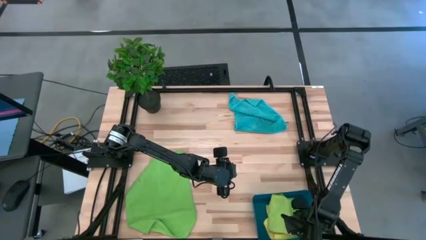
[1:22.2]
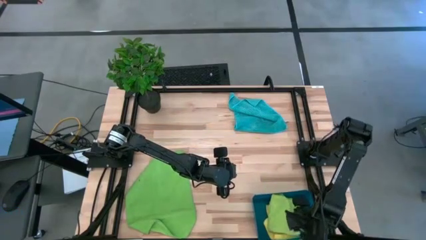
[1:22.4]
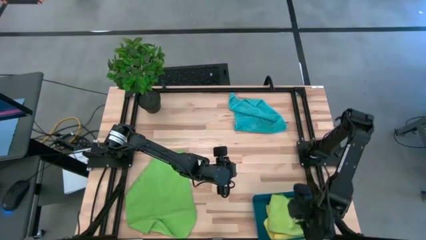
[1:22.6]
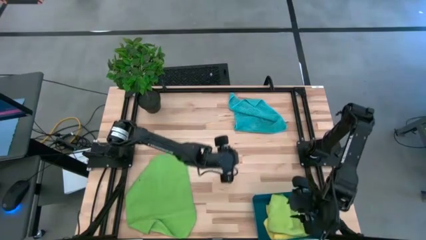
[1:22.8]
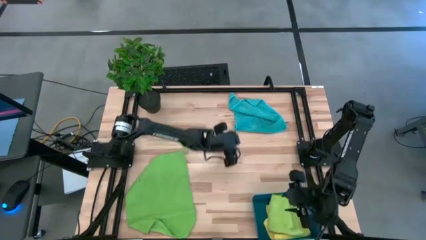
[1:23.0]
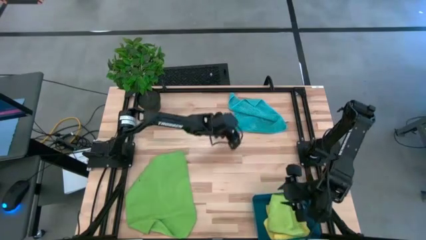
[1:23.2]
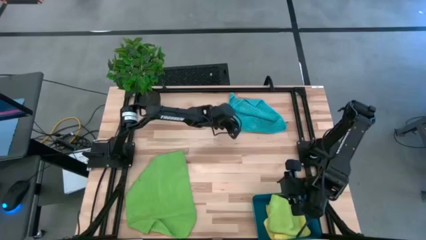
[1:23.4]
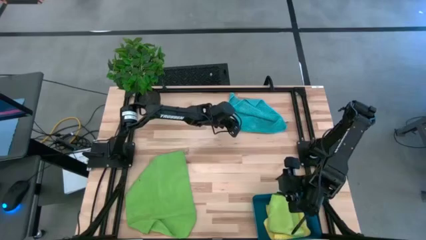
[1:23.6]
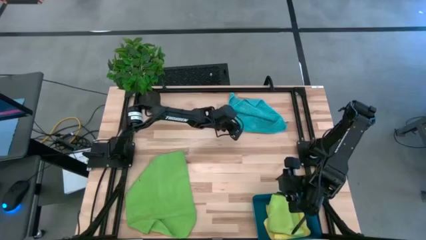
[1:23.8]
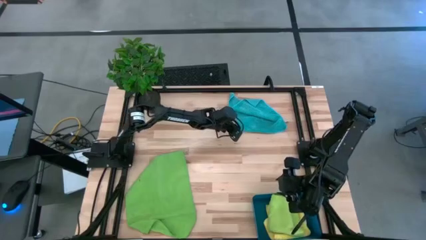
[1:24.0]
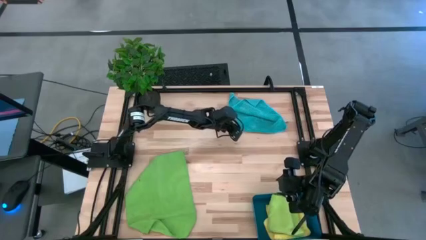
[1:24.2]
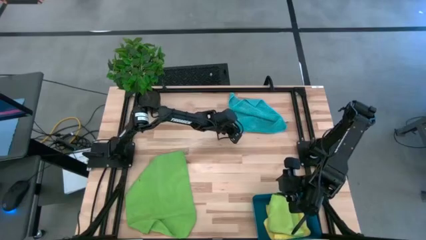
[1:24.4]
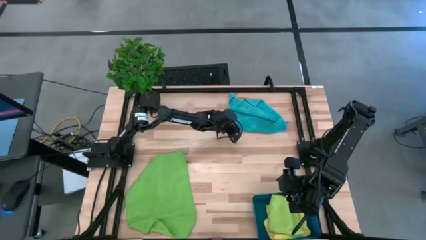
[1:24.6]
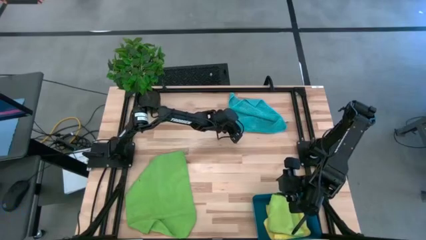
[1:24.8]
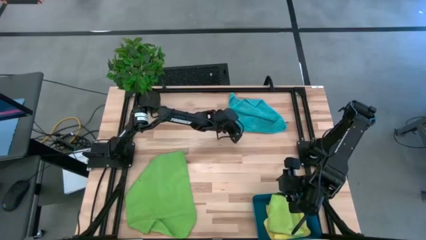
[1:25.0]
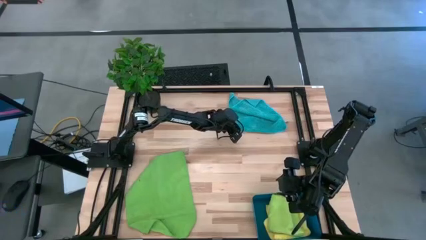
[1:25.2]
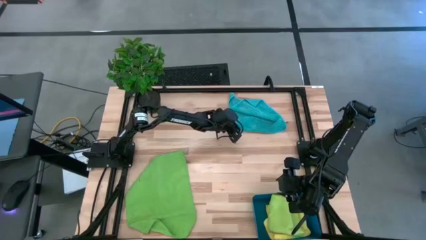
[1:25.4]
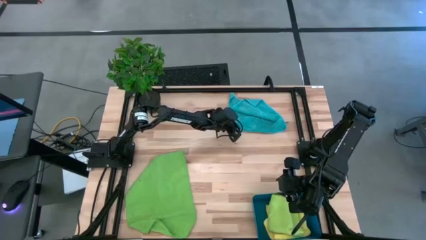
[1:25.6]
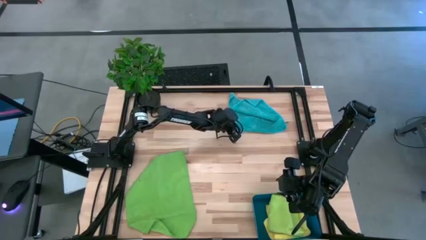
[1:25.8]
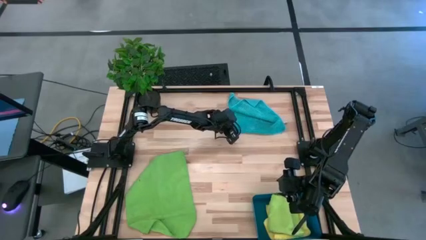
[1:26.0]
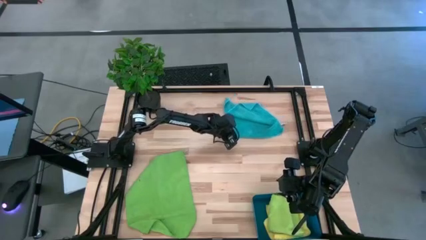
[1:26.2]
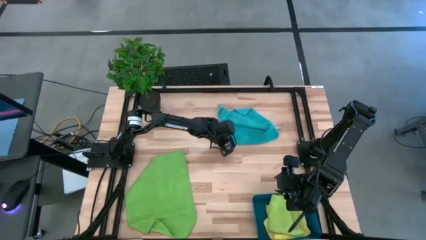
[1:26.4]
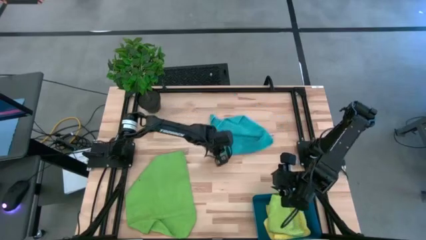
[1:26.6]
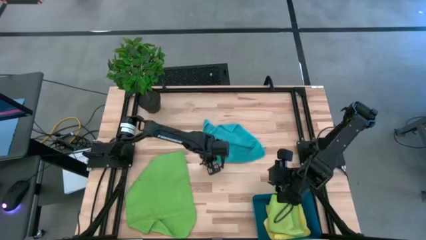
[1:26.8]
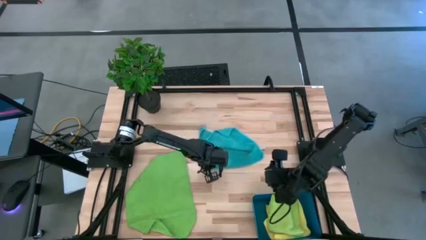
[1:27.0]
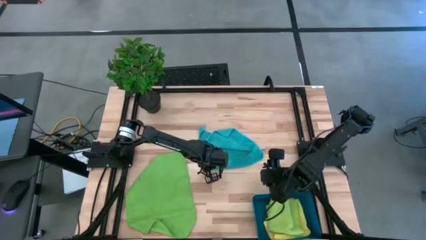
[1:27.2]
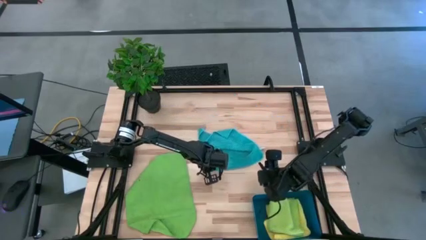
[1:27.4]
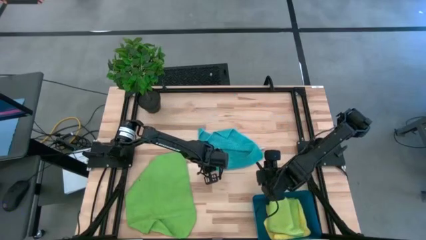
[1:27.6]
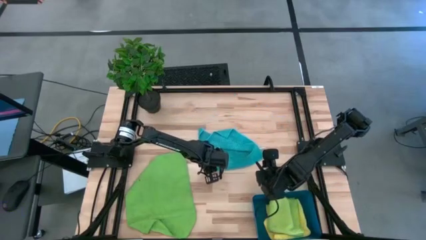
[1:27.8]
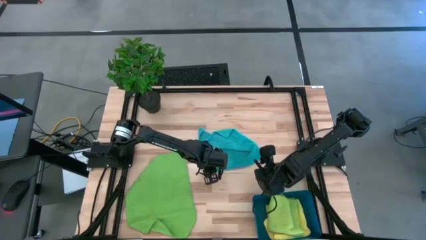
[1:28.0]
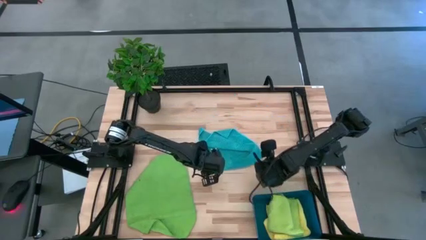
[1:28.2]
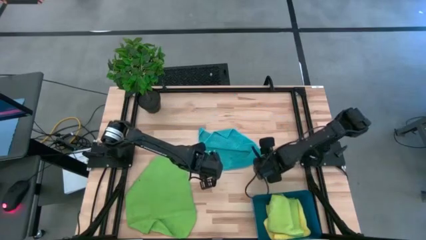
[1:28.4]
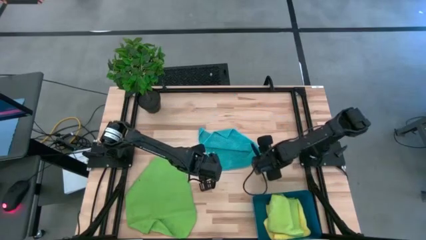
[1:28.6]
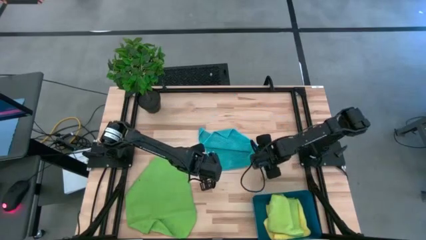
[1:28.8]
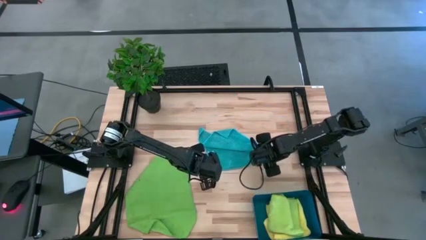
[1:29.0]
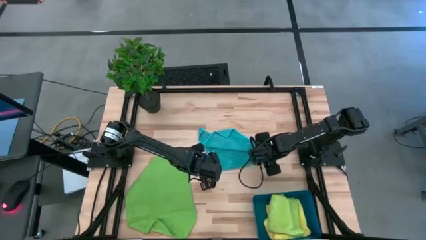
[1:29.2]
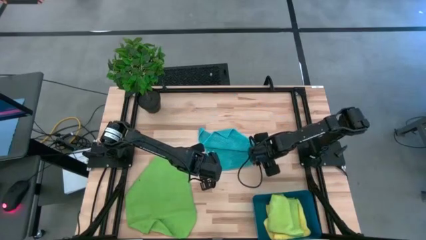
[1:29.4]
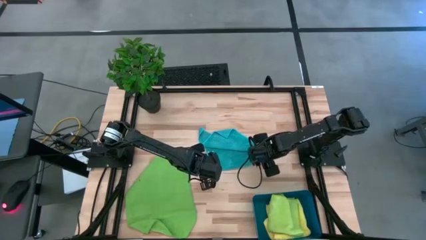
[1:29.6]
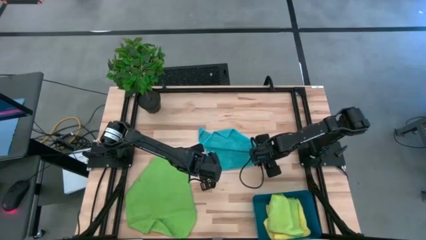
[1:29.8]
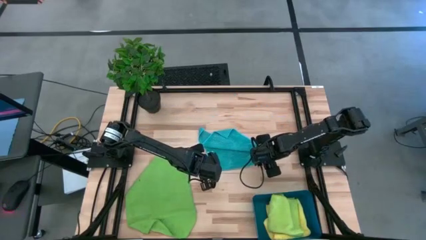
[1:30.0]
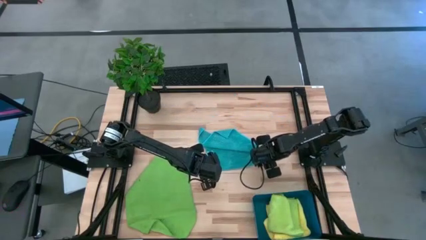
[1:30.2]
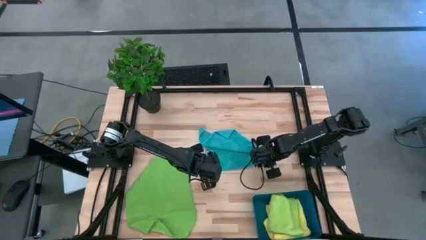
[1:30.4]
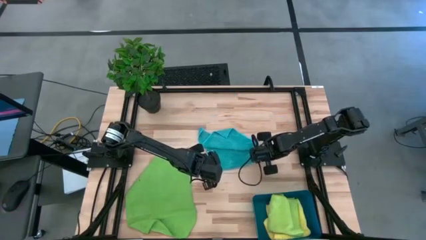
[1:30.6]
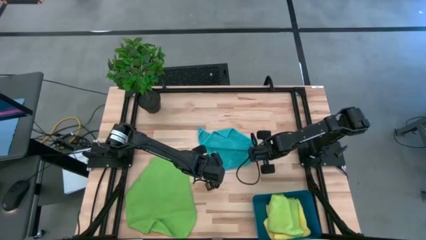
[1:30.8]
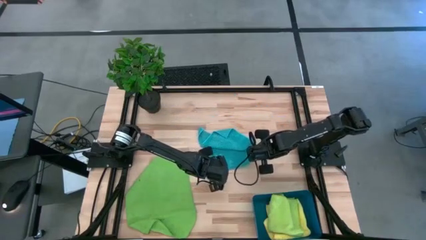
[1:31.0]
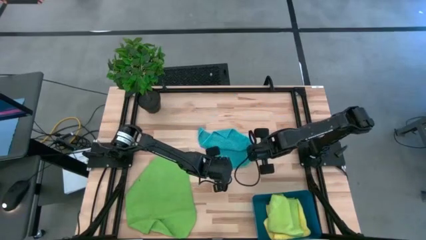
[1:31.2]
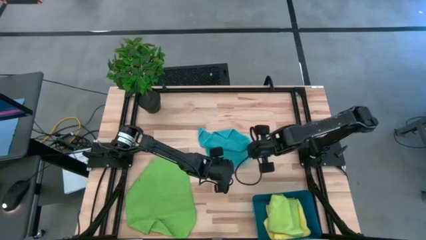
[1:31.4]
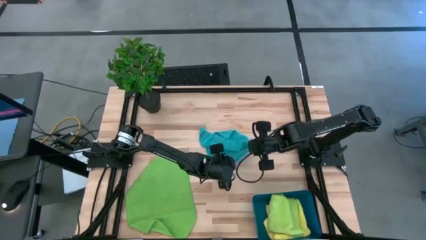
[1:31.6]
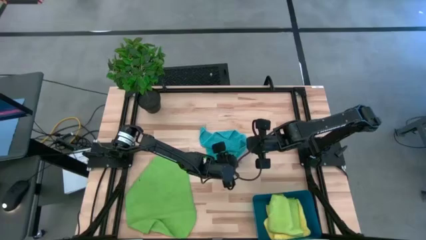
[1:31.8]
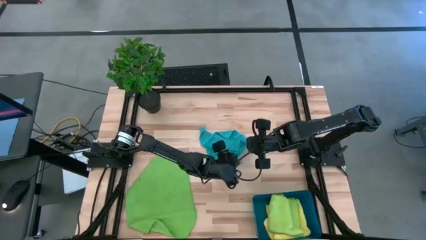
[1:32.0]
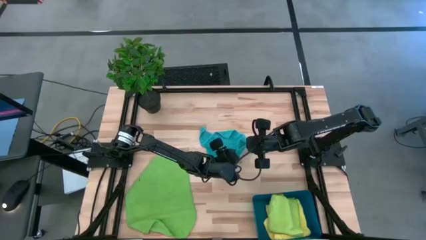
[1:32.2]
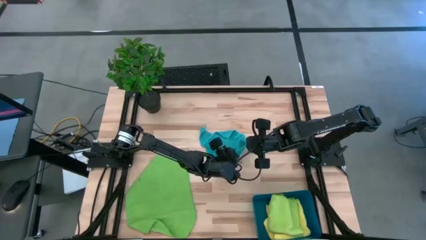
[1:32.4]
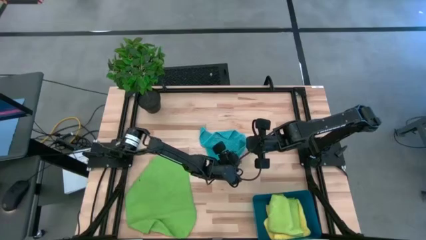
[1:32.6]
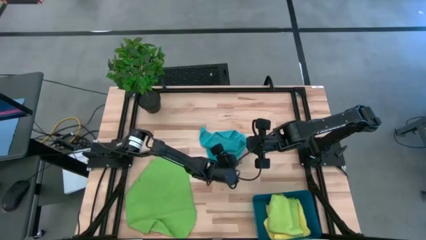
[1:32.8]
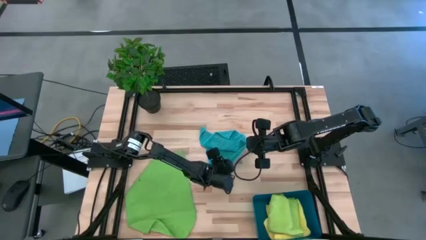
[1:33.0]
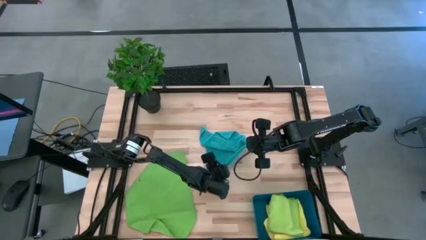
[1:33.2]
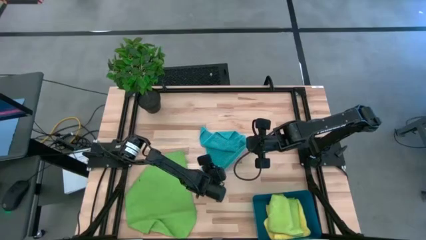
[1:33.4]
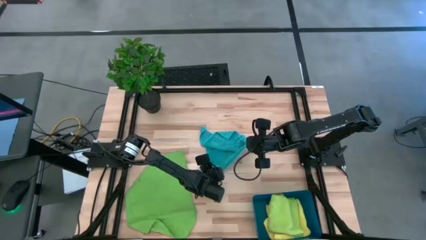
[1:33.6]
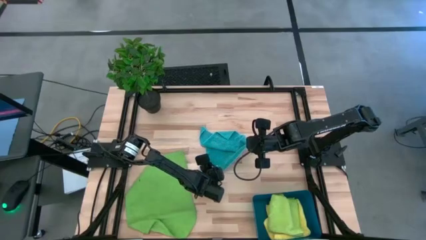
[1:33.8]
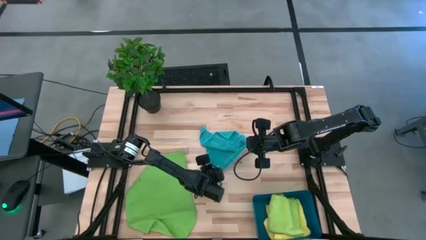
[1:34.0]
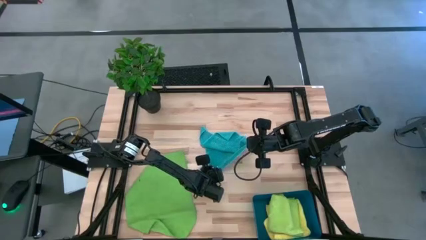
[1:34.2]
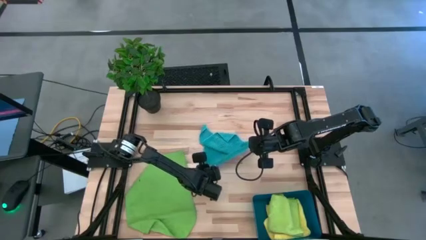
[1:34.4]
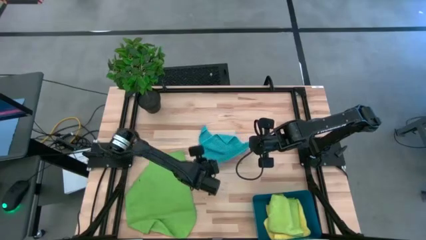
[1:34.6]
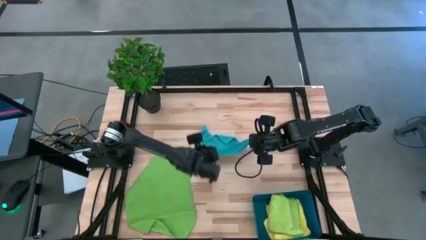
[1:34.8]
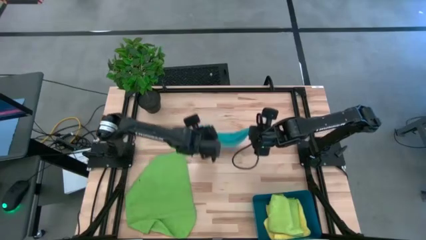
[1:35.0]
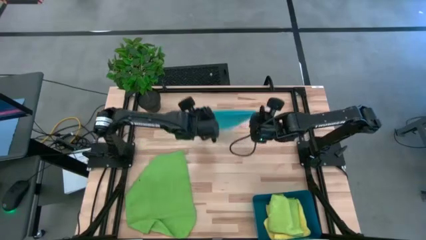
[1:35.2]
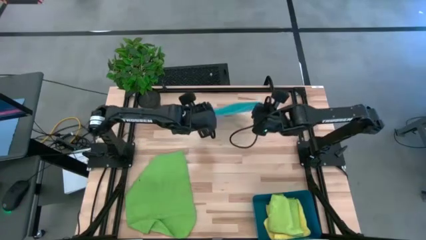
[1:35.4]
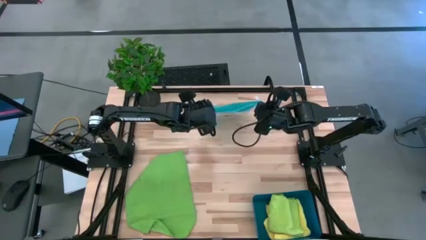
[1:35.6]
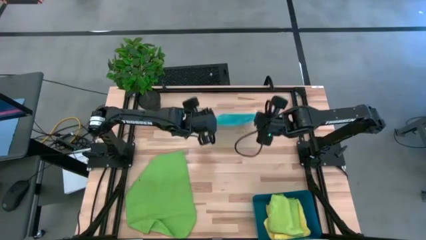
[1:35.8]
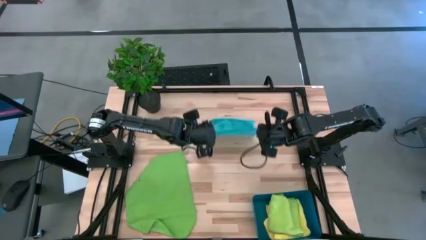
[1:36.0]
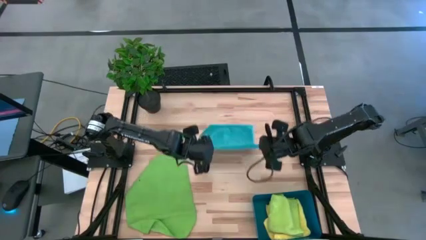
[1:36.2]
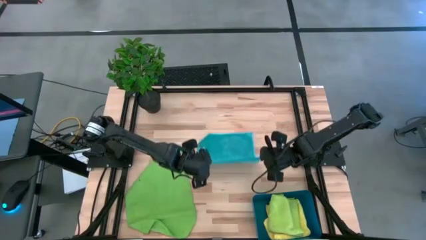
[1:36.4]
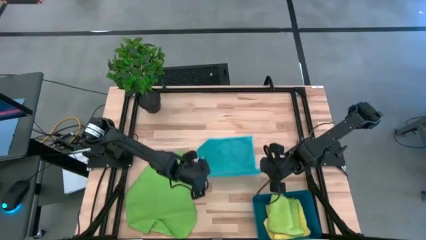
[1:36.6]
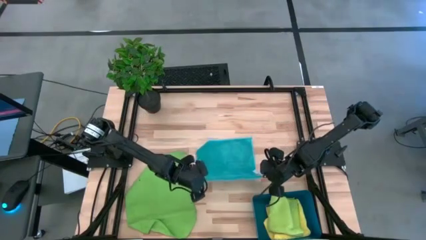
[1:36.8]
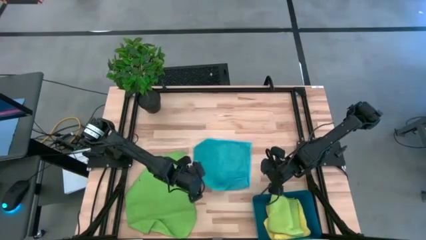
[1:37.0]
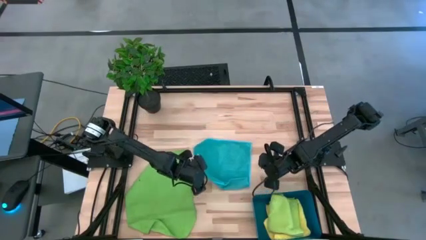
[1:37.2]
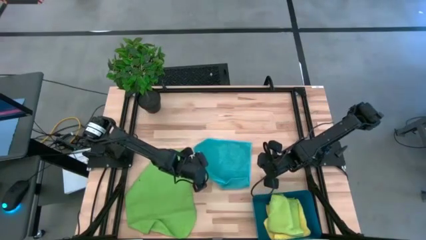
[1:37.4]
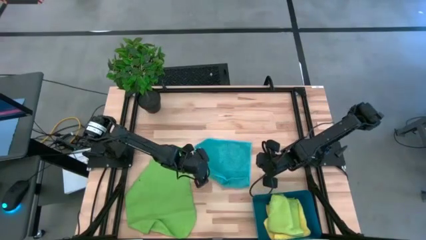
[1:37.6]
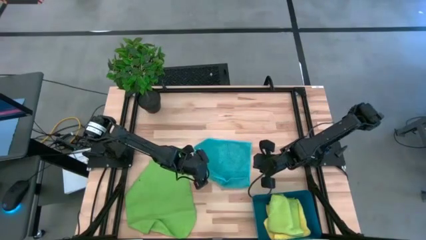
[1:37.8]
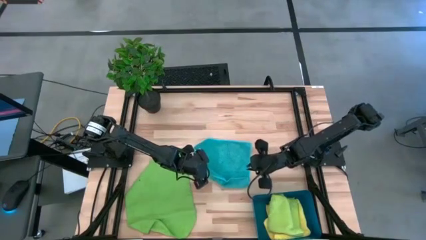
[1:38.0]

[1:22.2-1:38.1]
Task: Fold microfiber towels
Fold the blue towel

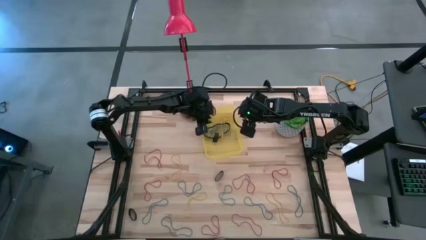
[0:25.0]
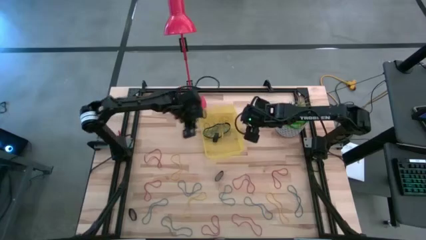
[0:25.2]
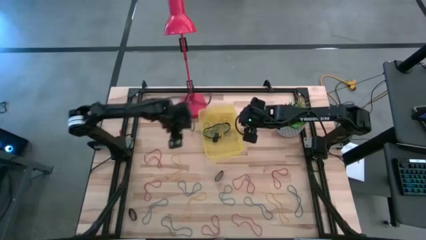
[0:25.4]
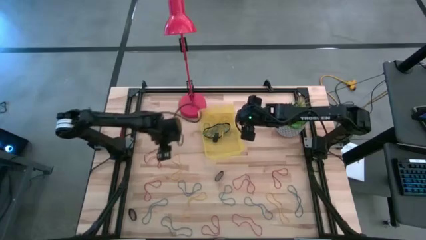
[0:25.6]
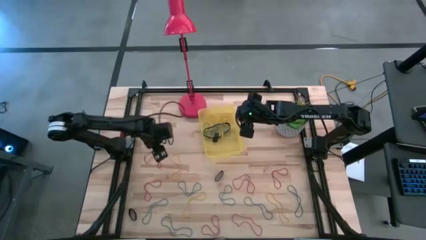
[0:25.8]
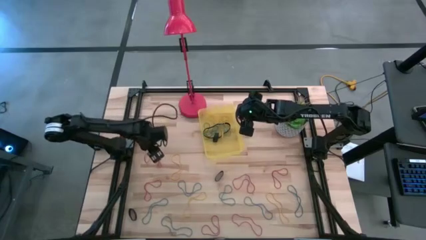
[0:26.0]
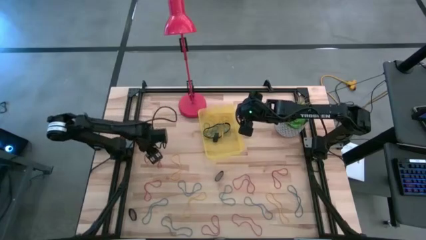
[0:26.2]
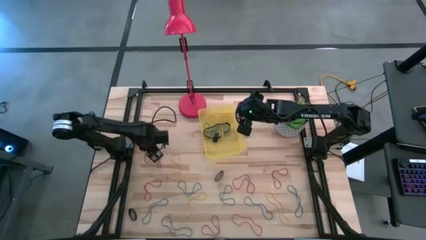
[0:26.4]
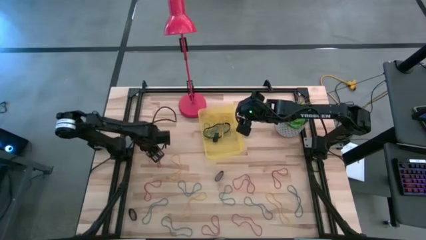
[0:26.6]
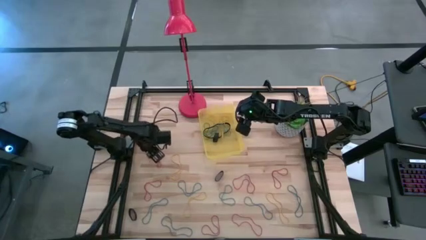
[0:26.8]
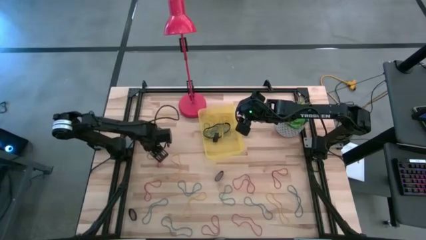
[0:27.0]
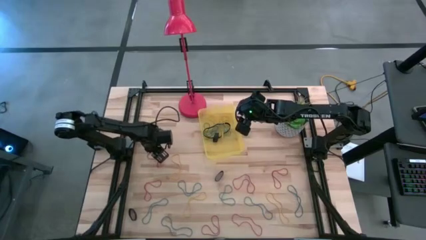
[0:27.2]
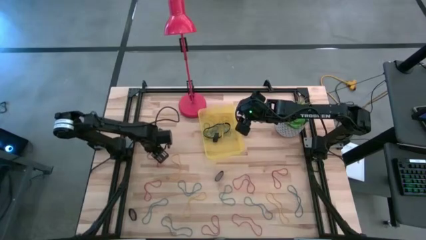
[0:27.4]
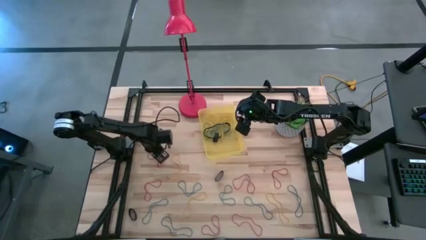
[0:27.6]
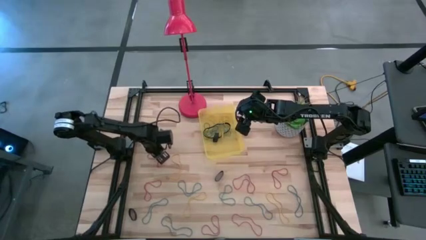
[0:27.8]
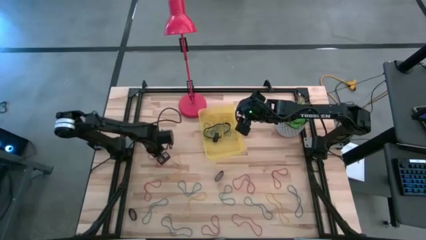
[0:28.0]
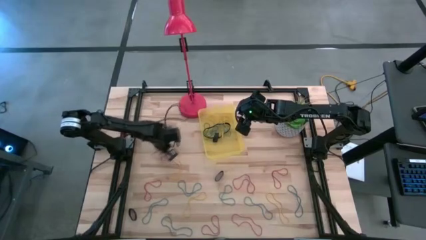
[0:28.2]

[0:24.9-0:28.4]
Task: Pick and place rubber bands into bin
Put the red rubber band into the yellow bin
